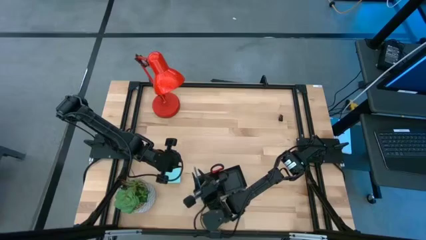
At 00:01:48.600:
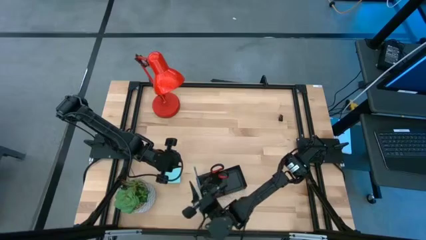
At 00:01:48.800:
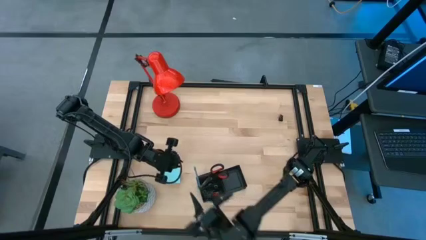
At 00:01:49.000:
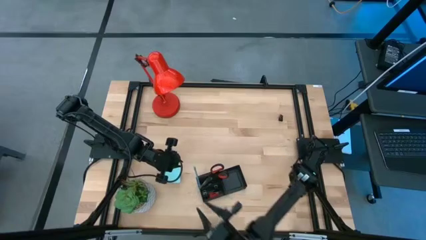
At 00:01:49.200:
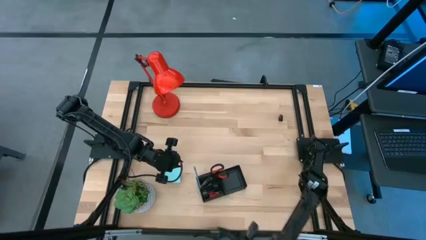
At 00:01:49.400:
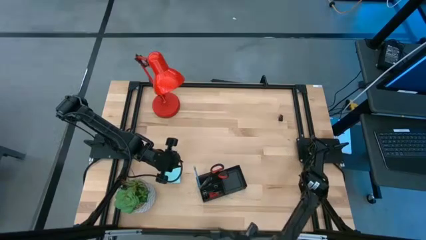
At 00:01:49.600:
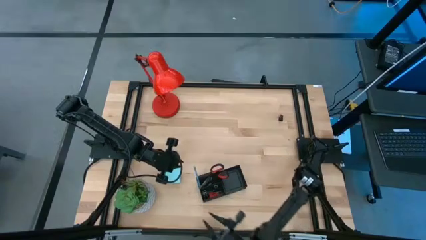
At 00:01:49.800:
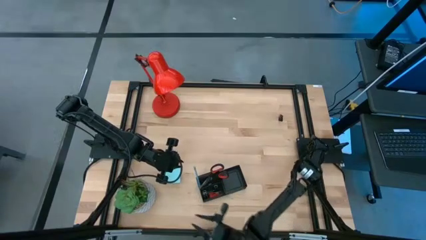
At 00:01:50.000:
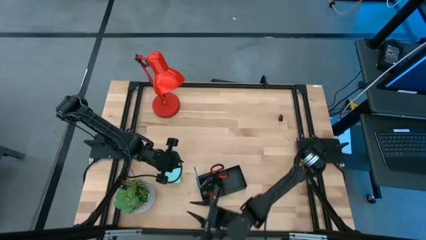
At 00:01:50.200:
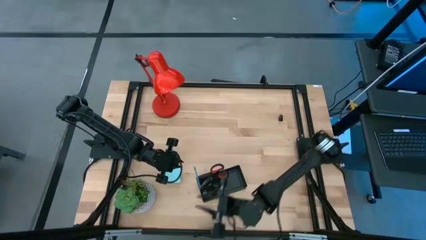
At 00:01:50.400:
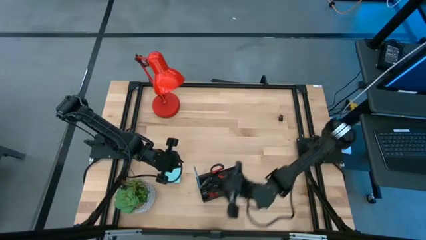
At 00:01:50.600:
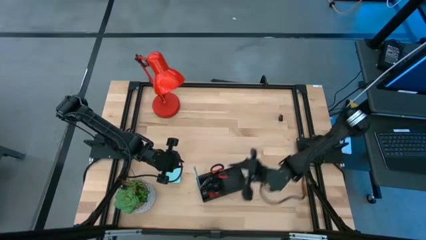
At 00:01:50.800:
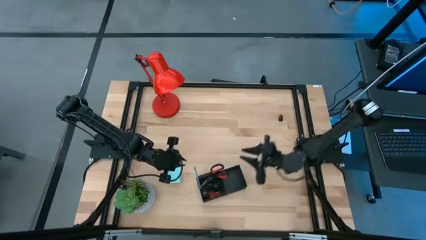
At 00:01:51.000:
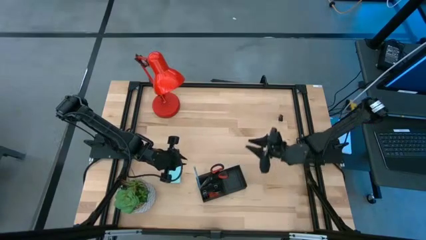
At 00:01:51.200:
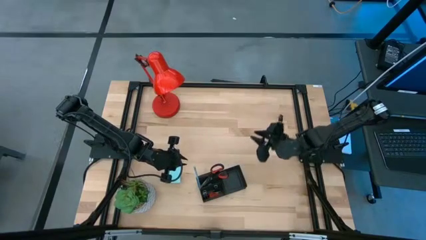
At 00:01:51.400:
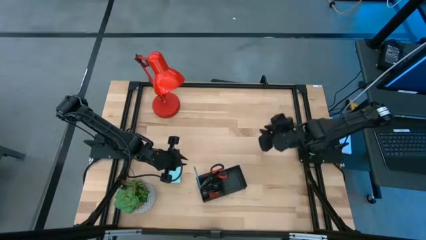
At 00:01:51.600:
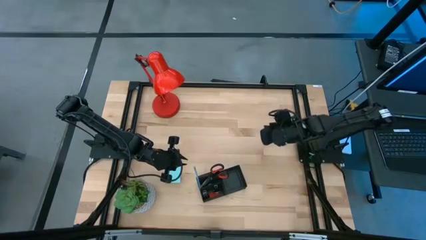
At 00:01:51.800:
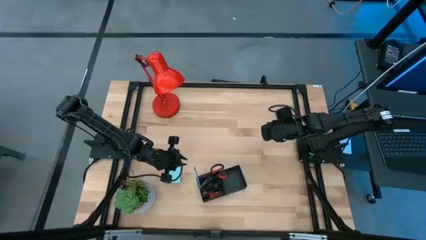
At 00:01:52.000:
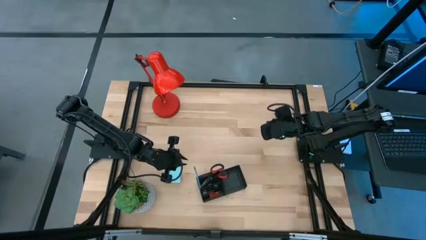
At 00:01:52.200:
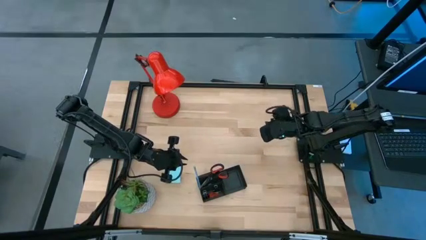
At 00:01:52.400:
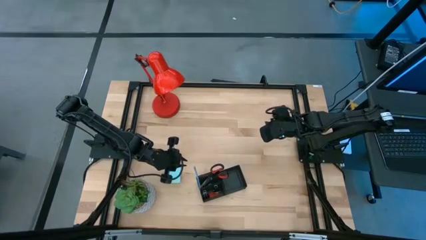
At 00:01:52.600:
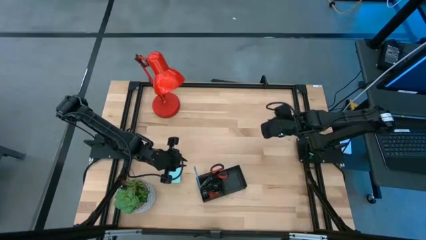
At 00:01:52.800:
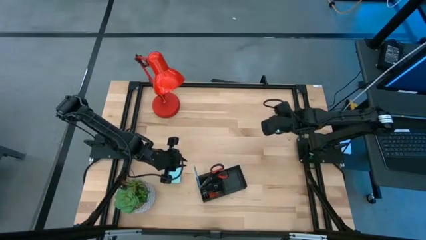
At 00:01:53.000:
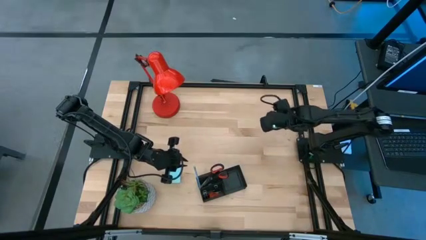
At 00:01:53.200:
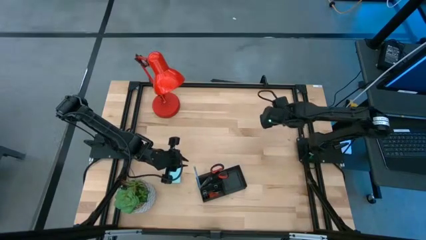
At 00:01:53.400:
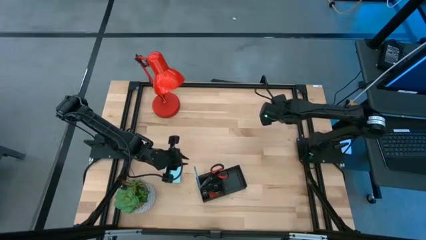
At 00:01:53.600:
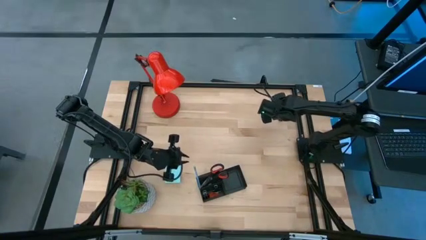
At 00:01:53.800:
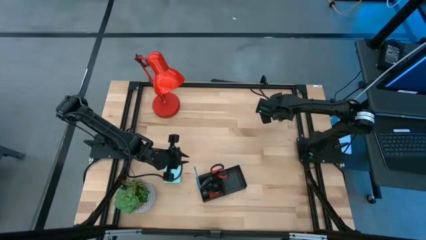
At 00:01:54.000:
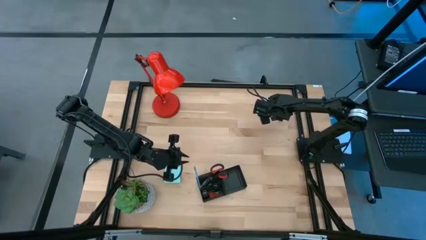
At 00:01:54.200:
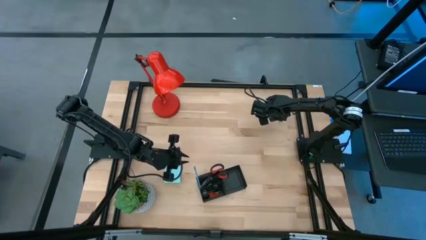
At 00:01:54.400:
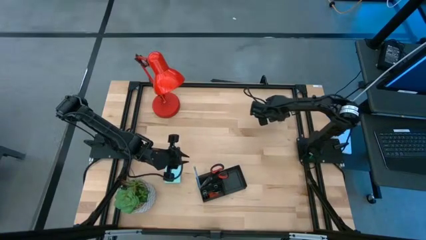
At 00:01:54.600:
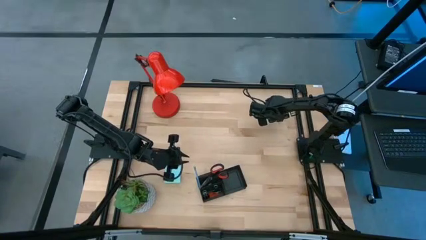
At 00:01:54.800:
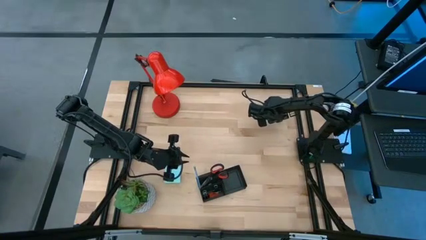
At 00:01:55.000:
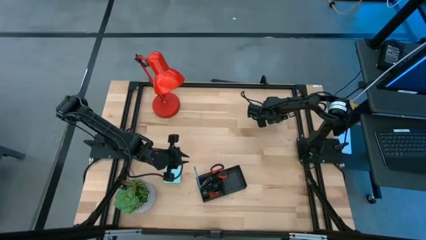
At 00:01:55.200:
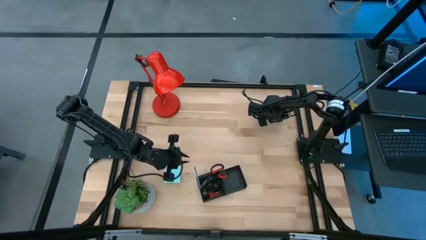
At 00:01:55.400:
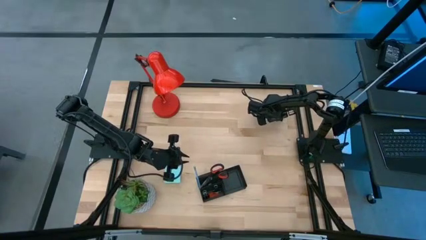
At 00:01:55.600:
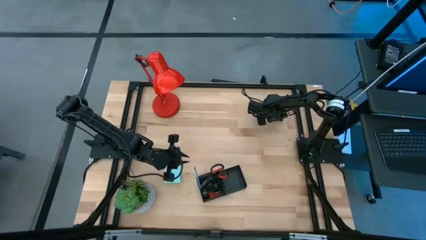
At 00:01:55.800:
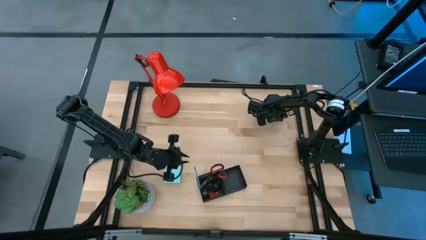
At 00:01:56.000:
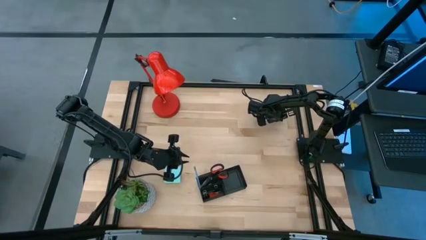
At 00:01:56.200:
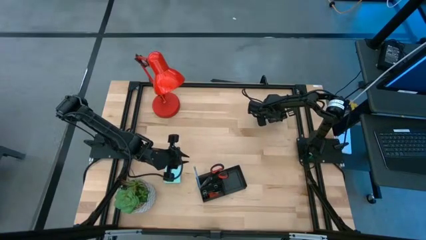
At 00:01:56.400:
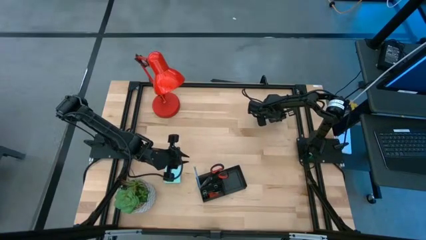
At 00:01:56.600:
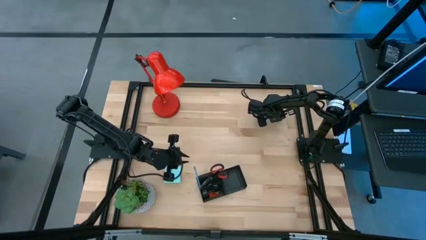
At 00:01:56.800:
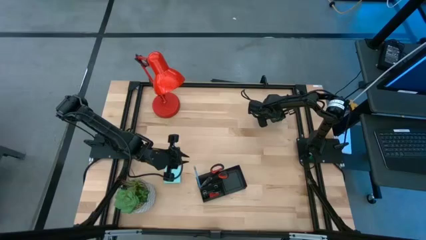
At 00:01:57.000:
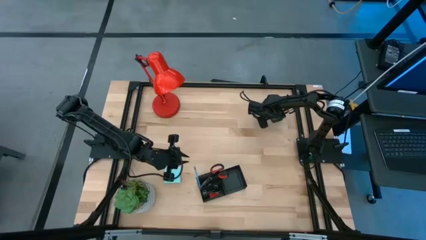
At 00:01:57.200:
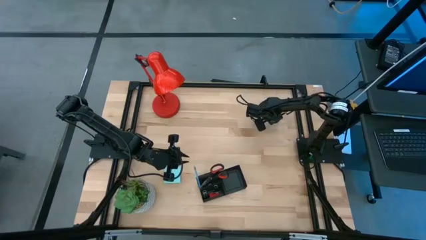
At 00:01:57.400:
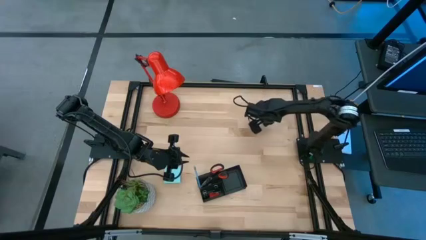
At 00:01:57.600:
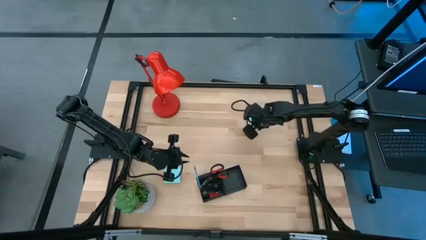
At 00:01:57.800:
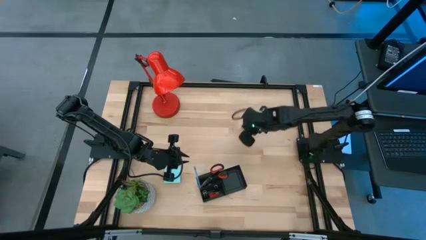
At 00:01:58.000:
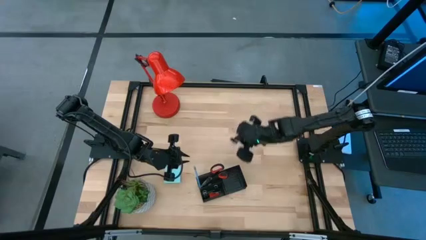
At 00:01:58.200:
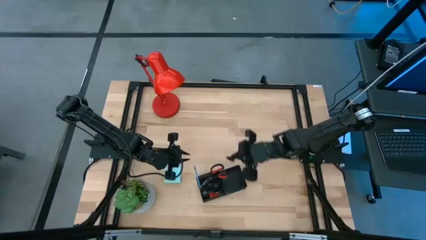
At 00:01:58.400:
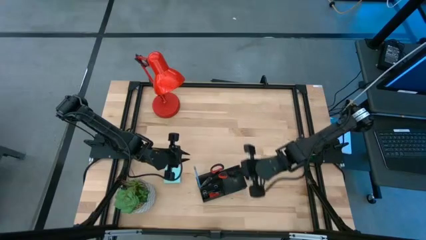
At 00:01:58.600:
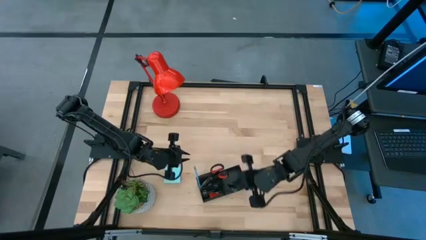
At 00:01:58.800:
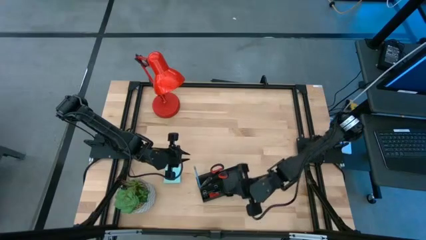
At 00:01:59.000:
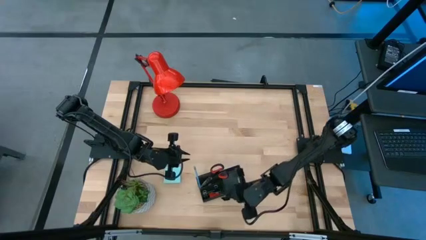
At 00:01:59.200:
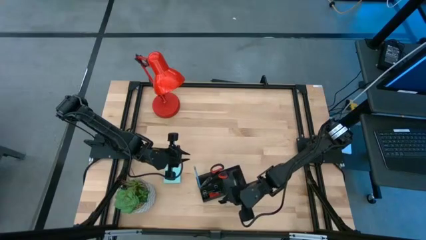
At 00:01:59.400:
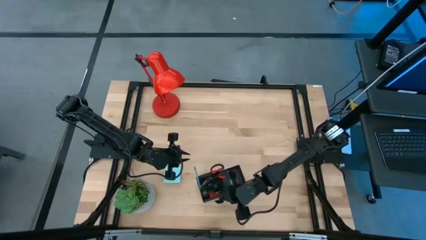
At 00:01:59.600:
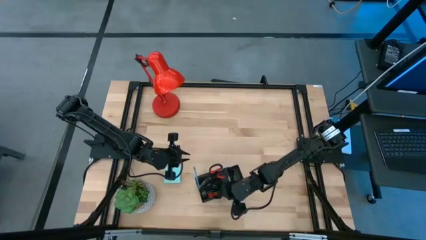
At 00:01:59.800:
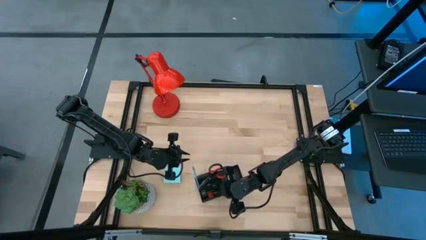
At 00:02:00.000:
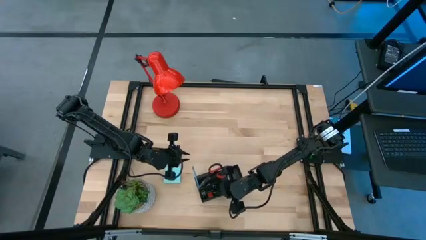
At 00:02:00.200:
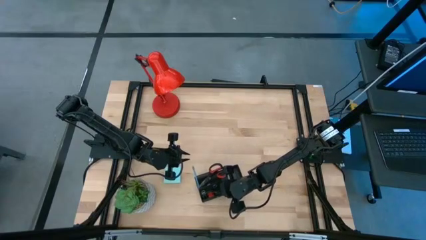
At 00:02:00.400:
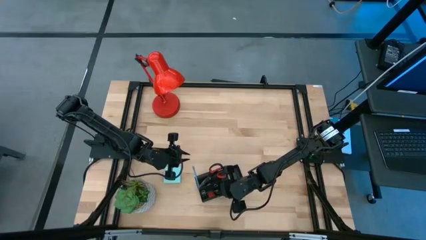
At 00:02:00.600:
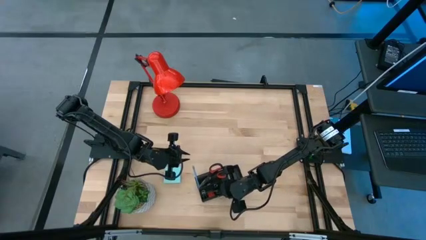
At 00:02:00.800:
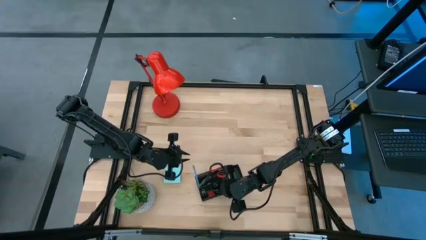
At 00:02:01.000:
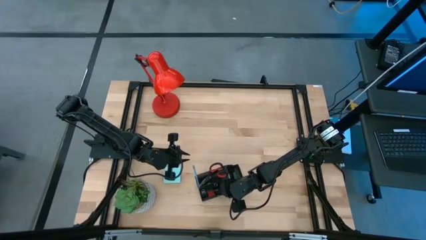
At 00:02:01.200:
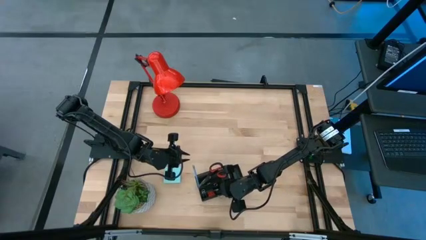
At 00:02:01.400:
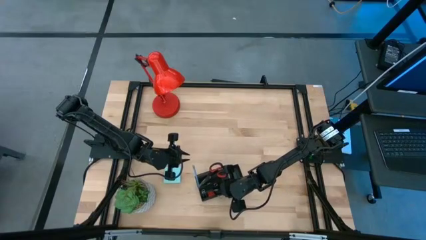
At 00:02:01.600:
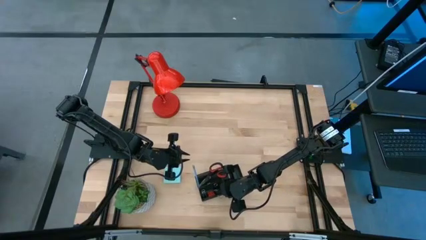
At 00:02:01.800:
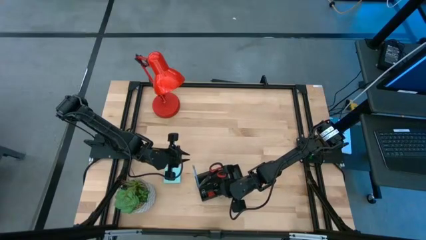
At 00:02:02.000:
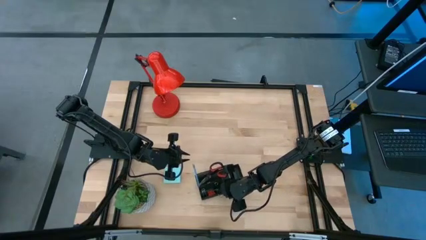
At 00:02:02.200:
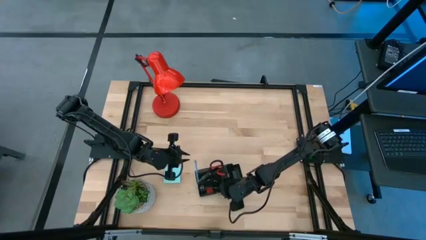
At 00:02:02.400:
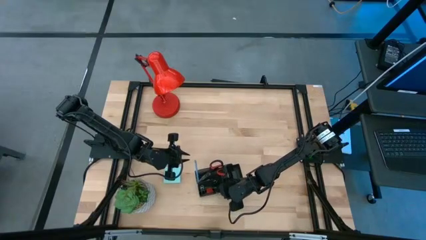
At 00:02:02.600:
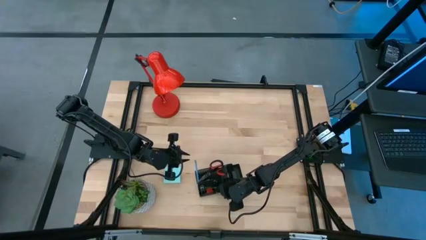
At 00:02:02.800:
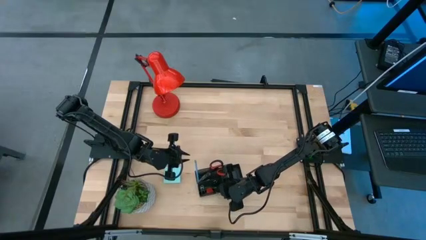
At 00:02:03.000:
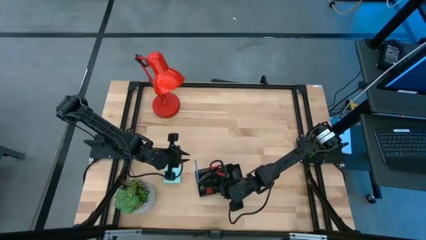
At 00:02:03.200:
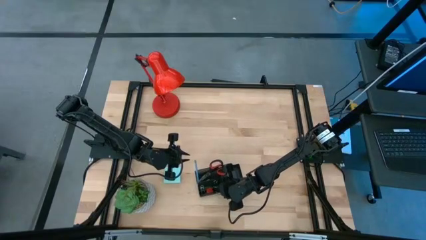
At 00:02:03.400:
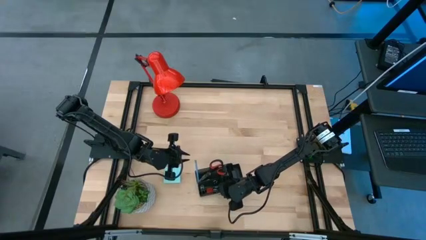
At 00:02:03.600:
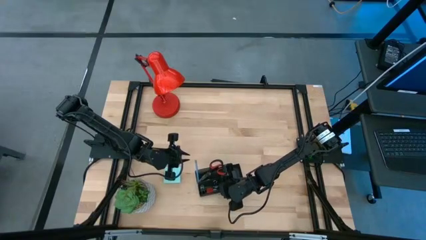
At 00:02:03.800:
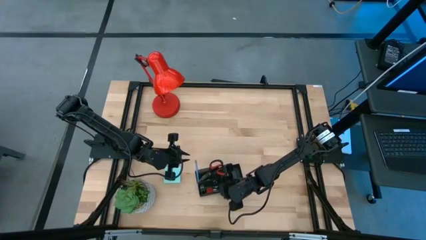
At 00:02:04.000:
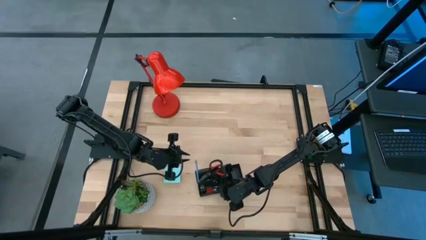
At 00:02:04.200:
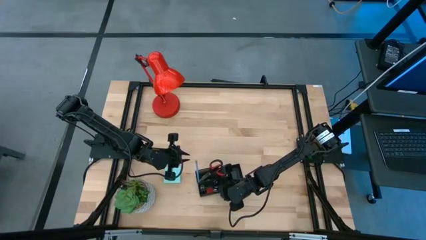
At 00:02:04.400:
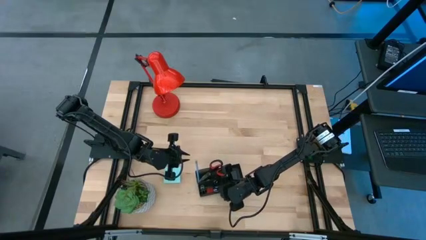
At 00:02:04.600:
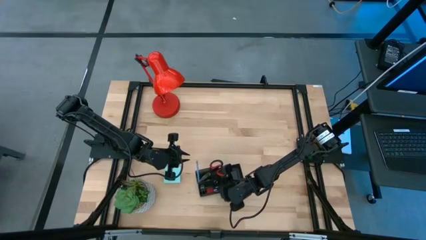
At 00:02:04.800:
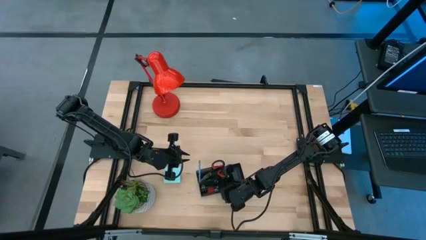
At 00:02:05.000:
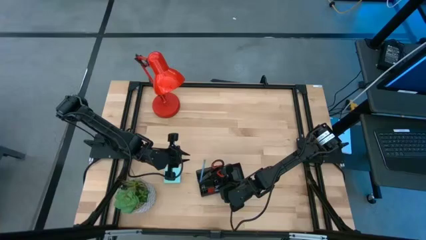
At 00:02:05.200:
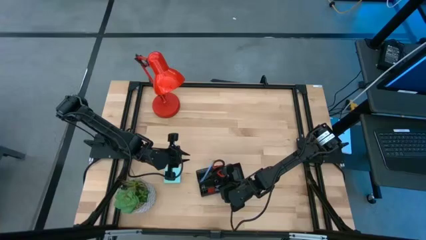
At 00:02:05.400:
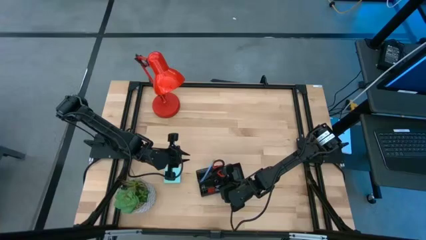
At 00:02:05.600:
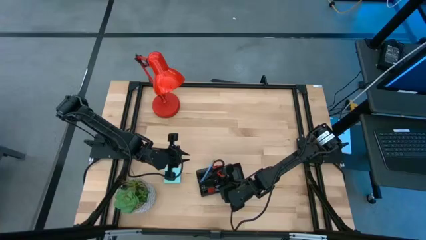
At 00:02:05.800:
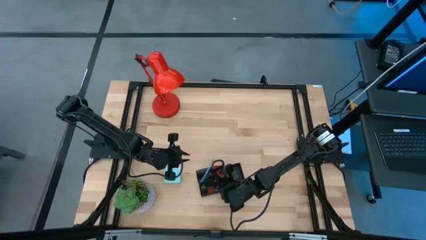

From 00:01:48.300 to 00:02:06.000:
Task: Pick and place office supplies into organizer
Put the black binder clip into the black desk organizer
